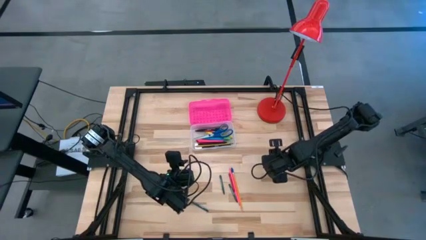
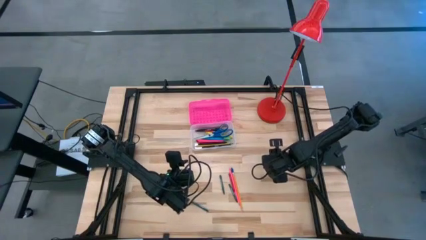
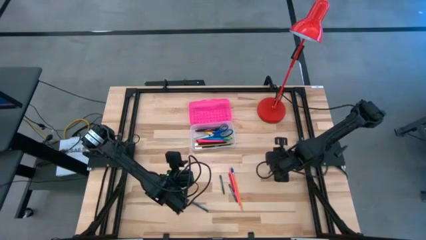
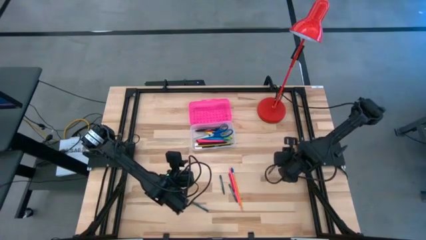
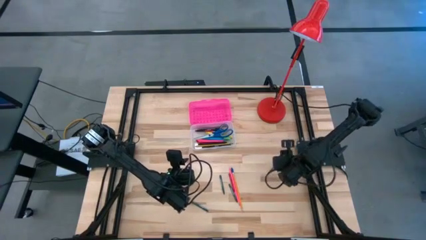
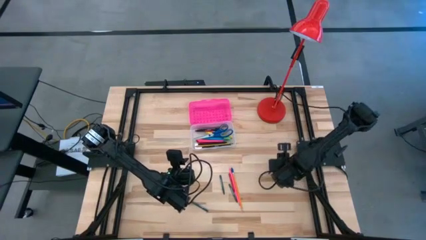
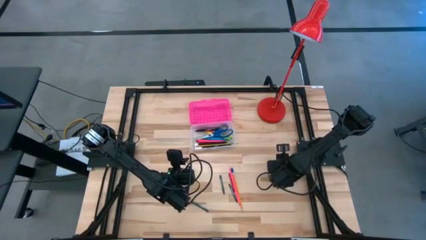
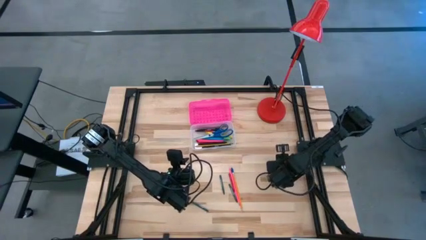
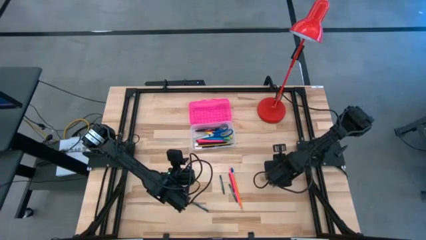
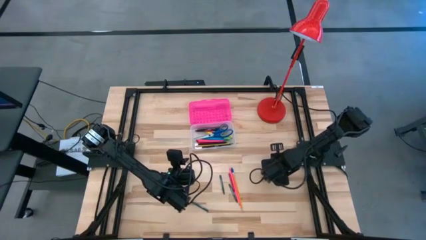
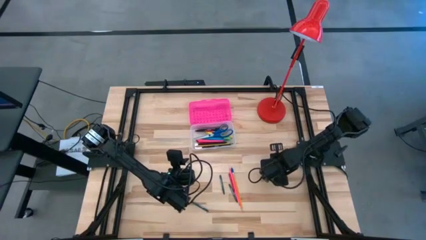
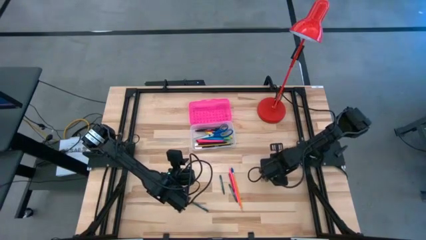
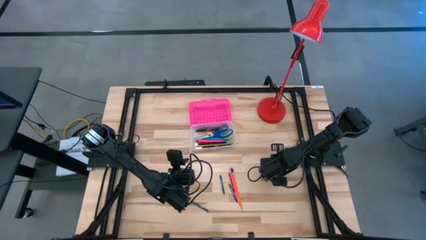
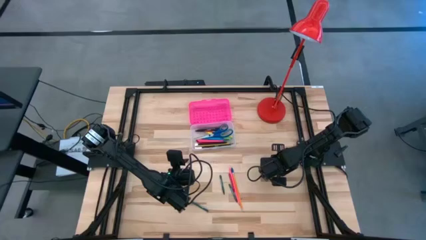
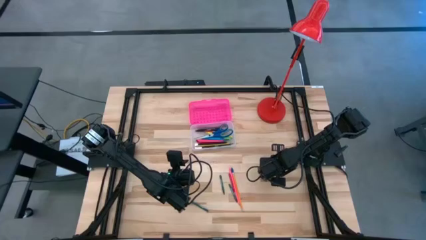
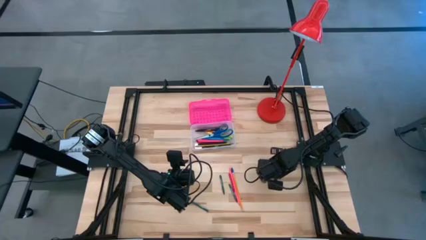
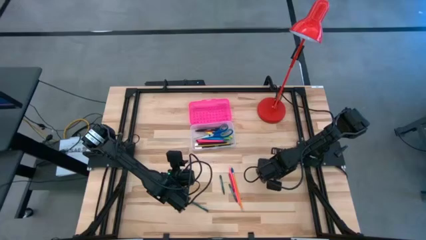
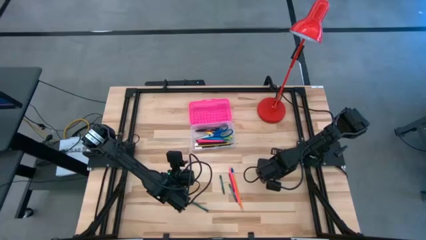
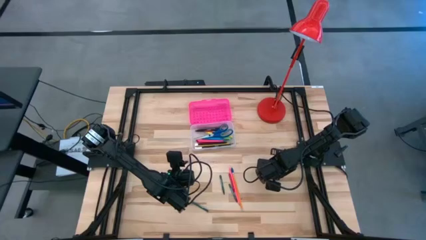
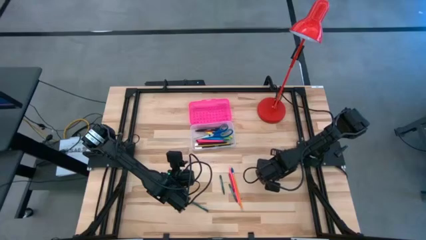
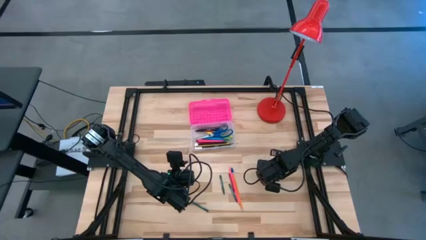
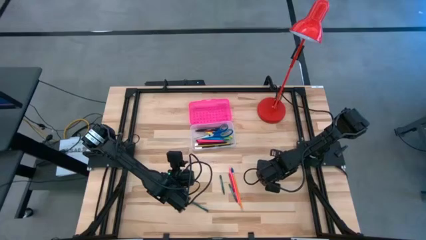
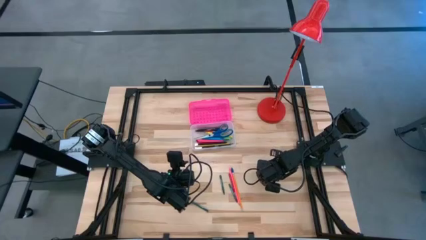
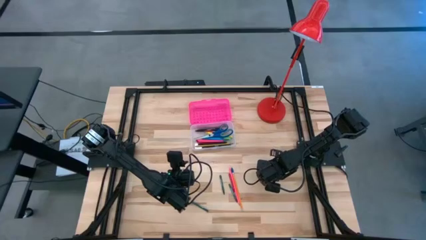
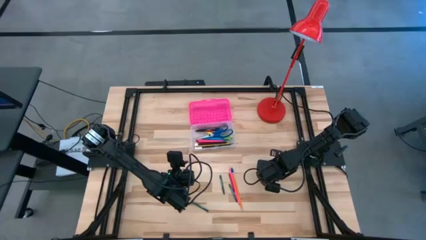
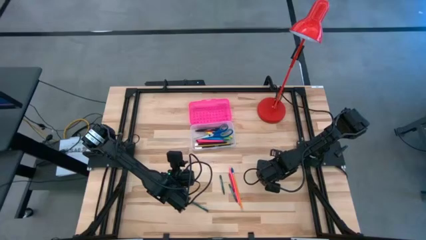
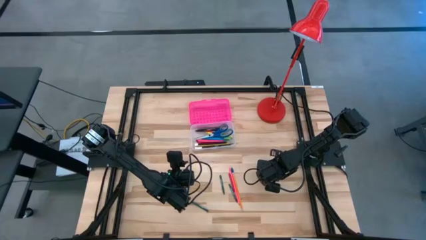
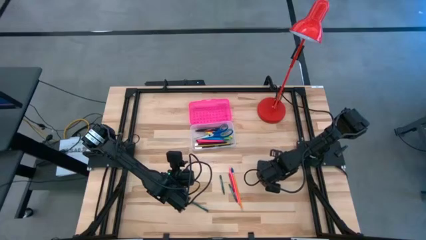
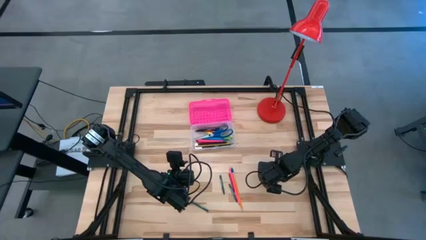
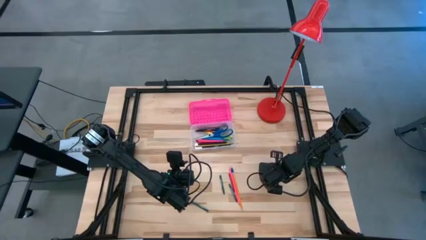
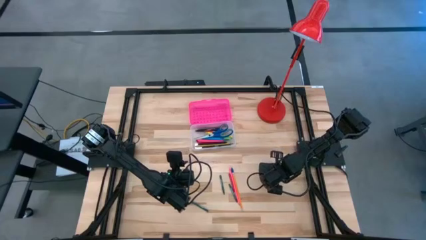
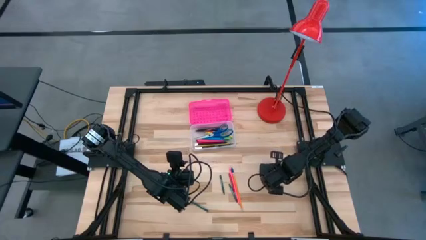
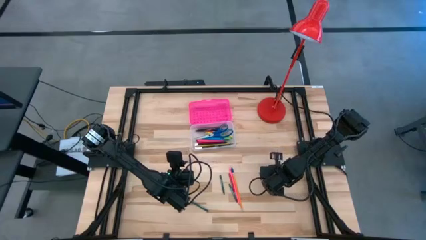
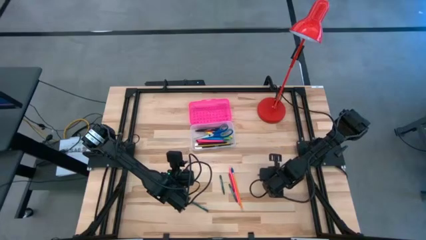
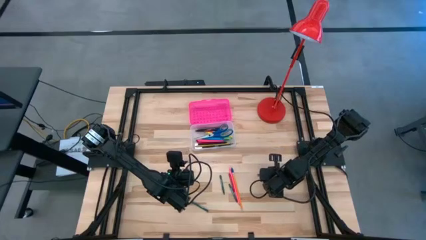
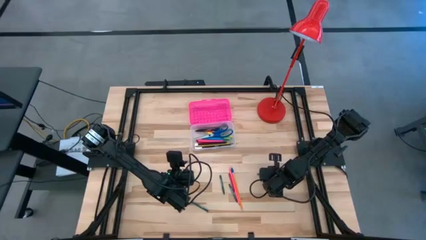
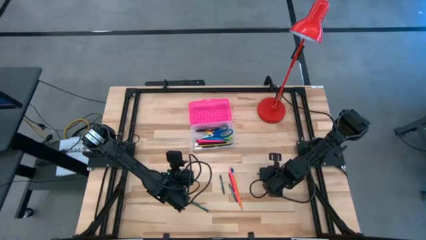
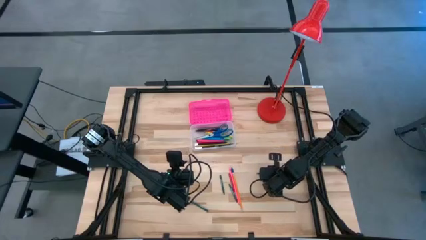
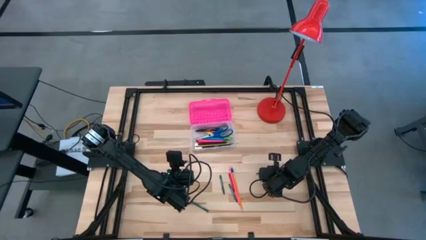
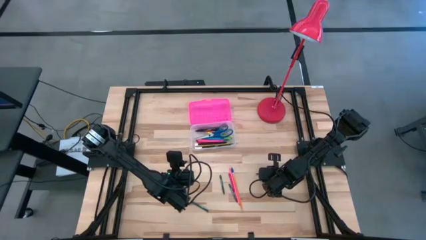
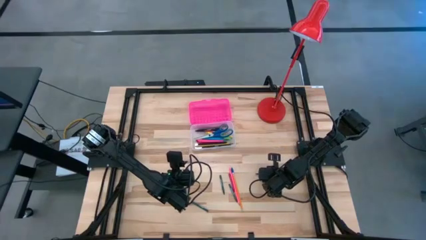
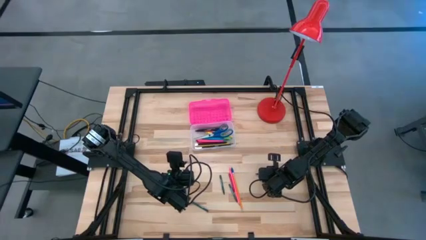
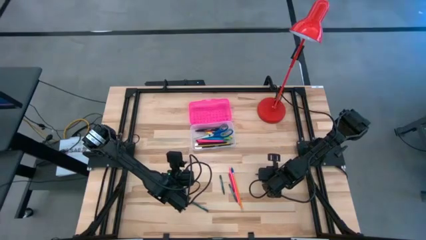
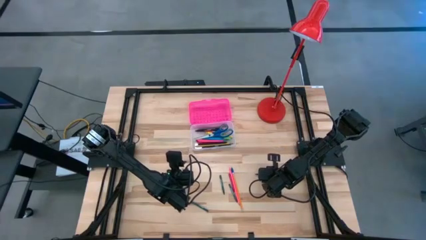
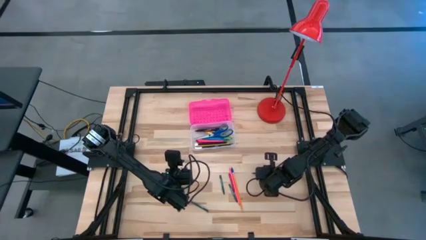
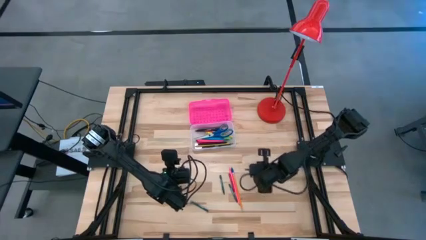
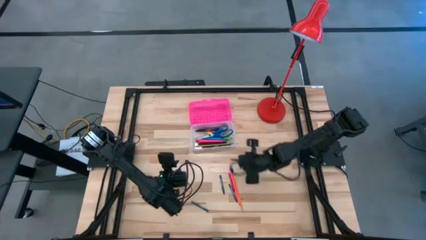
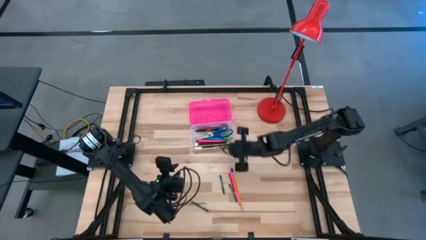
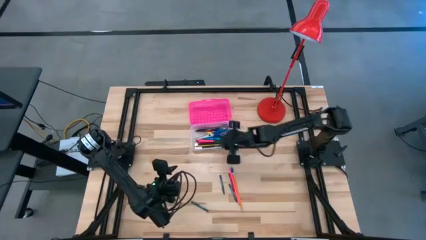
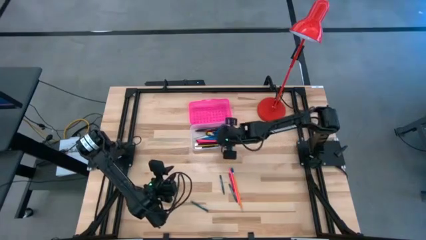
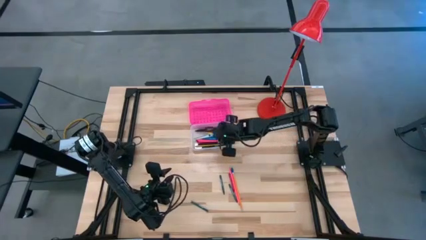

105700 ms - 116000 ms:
Task: Pick & place school supplies into a supply box
Put the green crayon into the pink supply box
